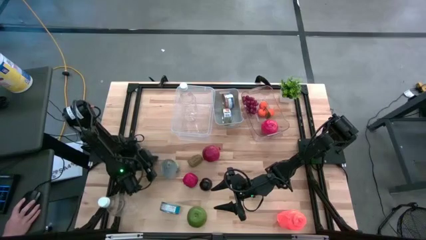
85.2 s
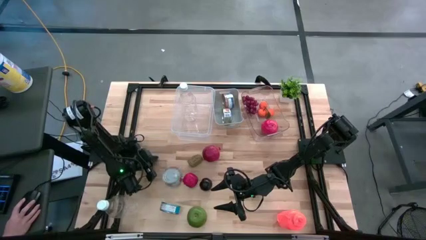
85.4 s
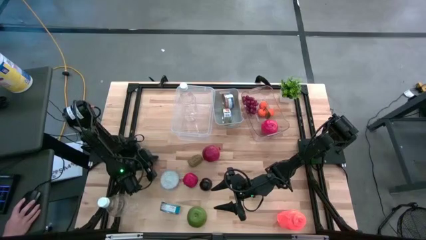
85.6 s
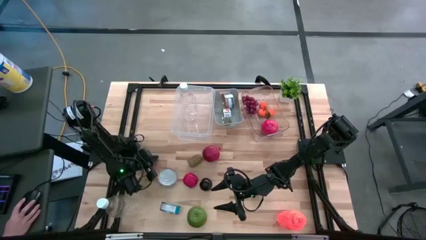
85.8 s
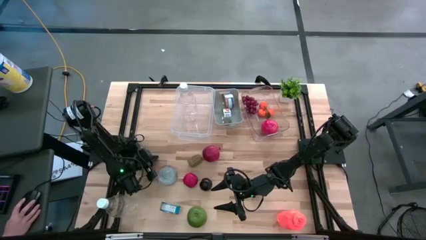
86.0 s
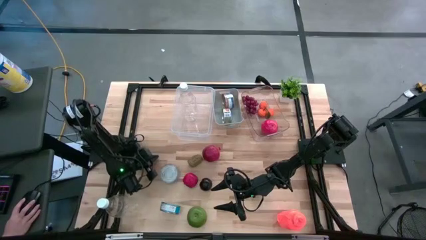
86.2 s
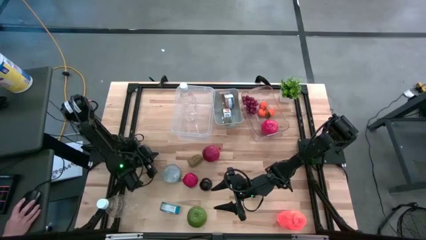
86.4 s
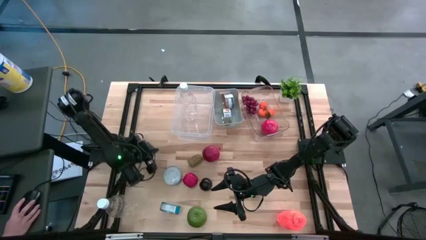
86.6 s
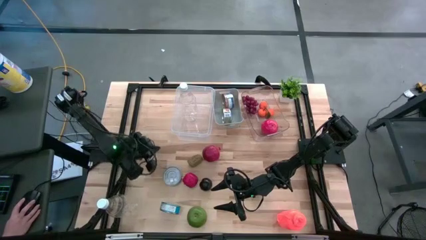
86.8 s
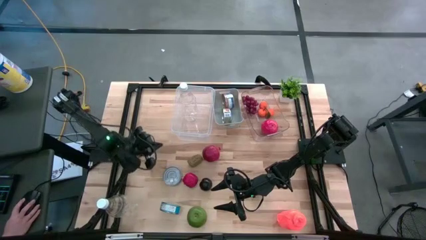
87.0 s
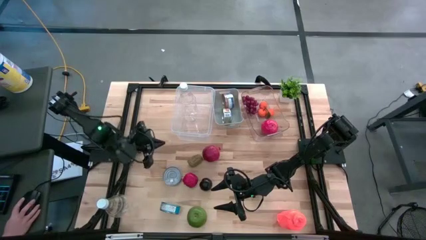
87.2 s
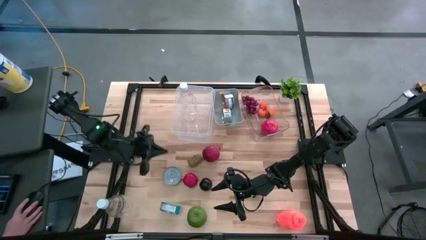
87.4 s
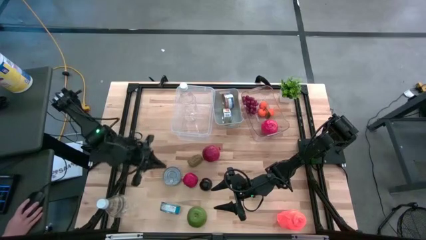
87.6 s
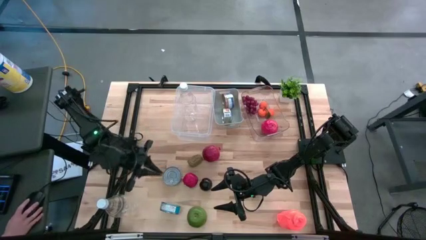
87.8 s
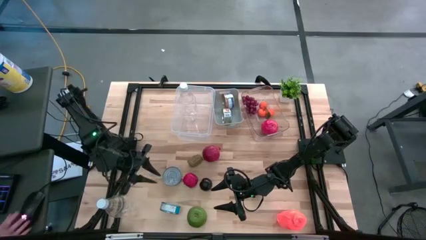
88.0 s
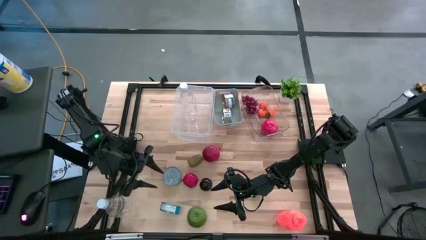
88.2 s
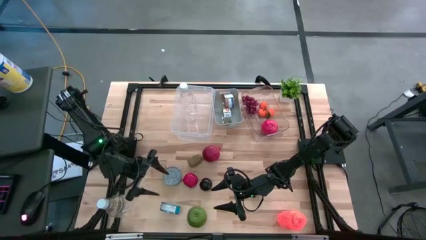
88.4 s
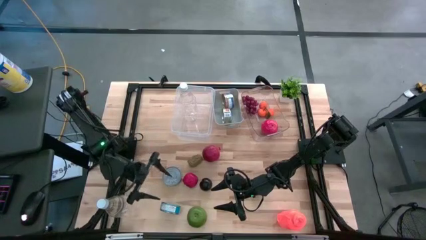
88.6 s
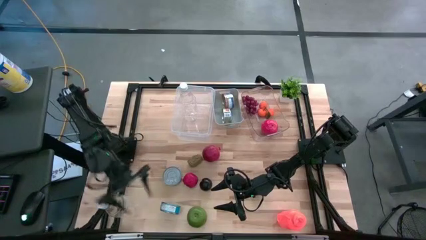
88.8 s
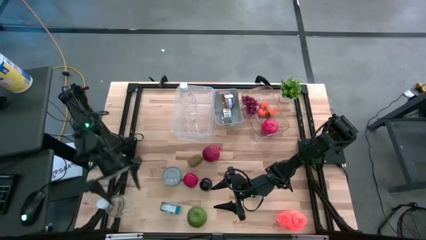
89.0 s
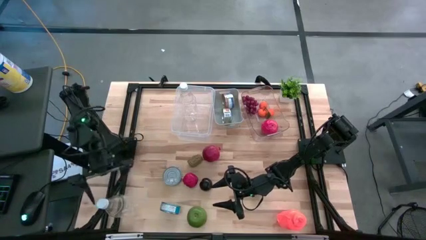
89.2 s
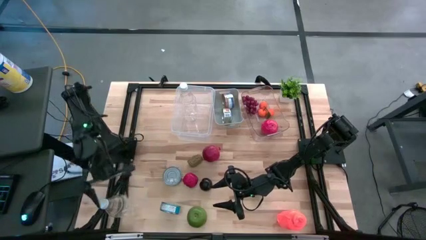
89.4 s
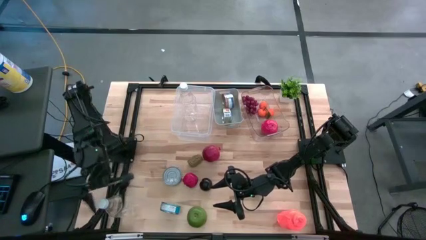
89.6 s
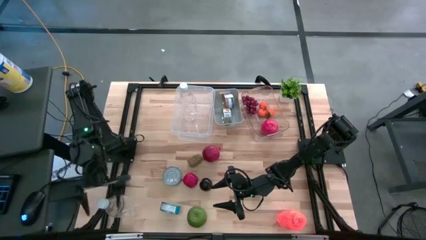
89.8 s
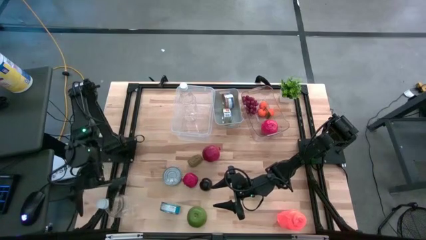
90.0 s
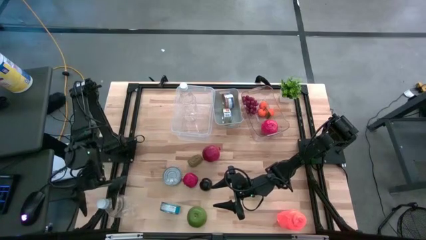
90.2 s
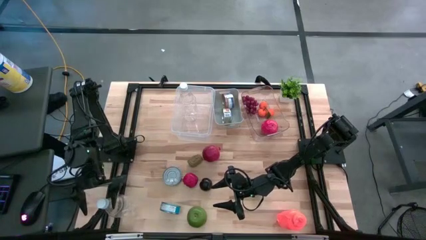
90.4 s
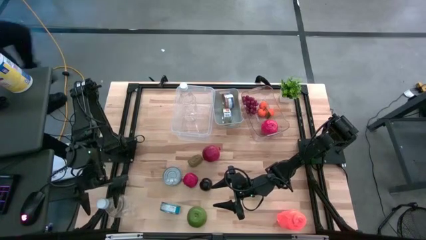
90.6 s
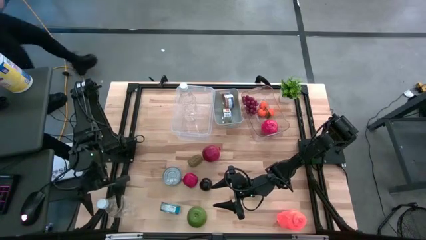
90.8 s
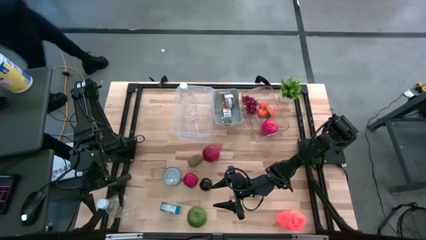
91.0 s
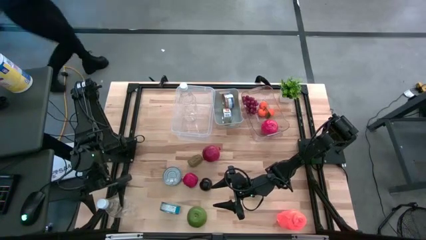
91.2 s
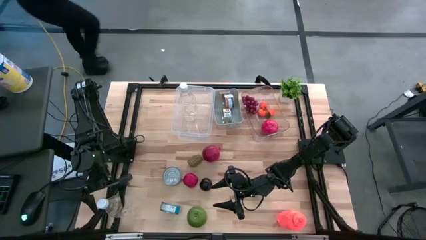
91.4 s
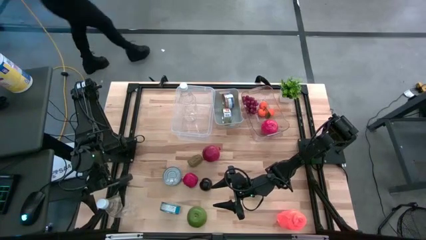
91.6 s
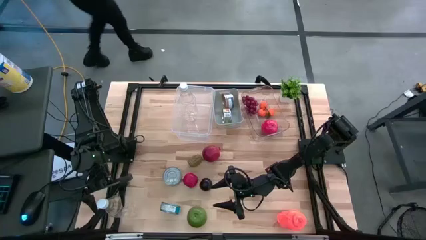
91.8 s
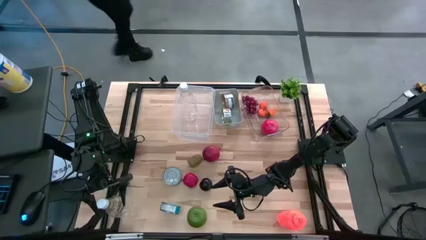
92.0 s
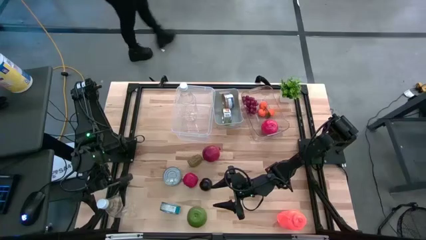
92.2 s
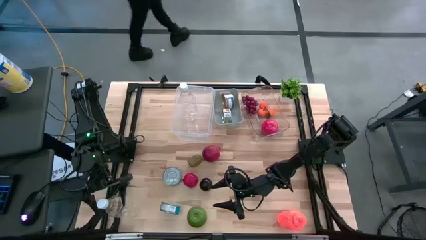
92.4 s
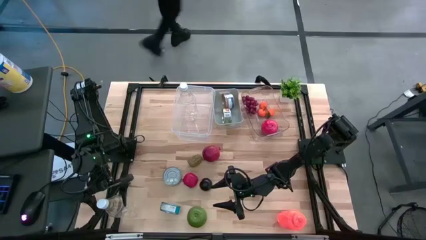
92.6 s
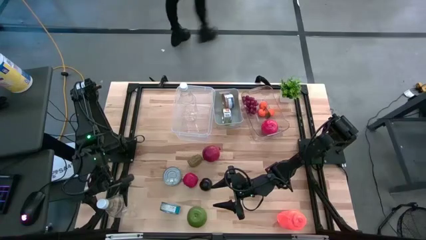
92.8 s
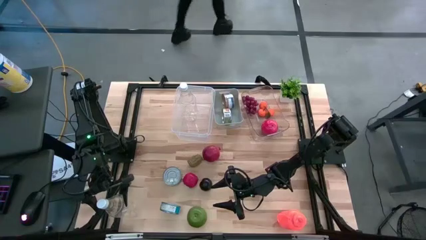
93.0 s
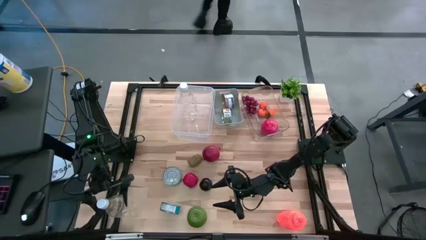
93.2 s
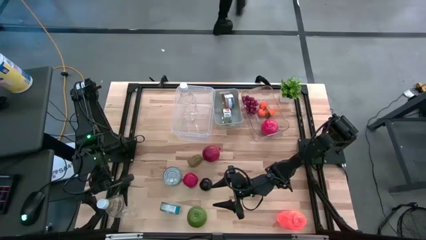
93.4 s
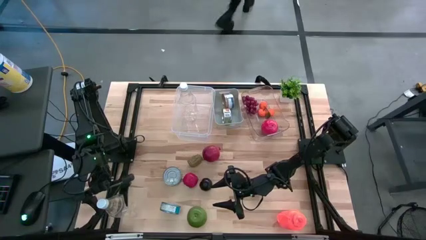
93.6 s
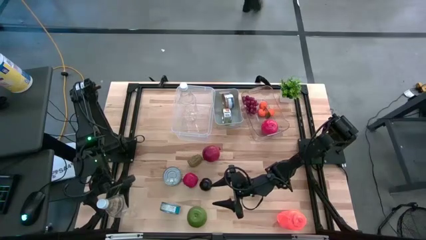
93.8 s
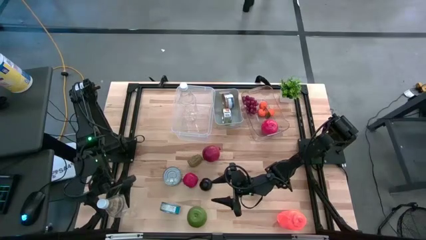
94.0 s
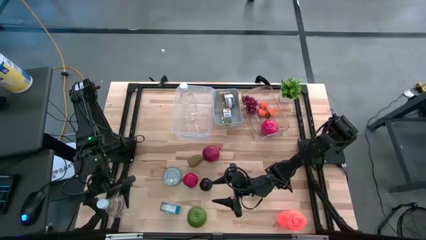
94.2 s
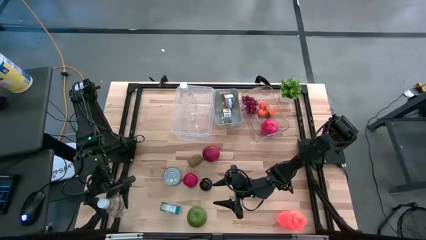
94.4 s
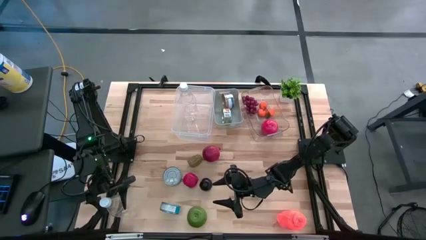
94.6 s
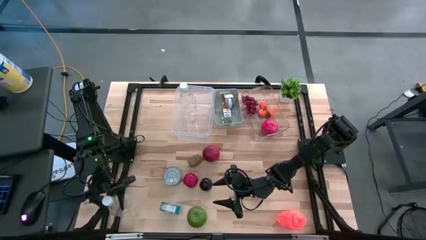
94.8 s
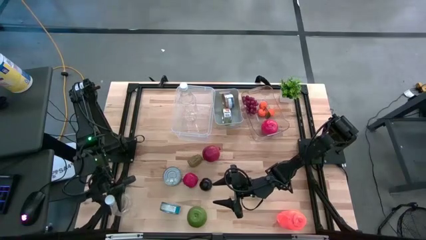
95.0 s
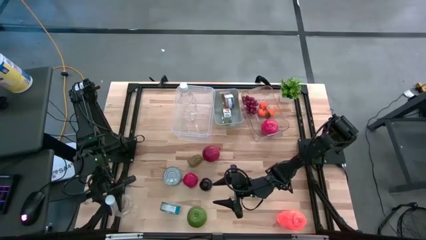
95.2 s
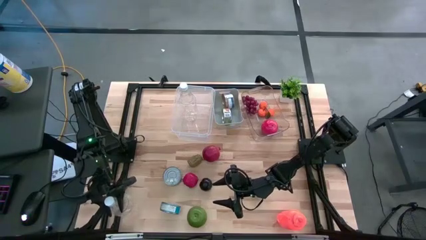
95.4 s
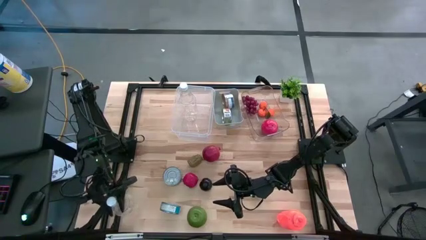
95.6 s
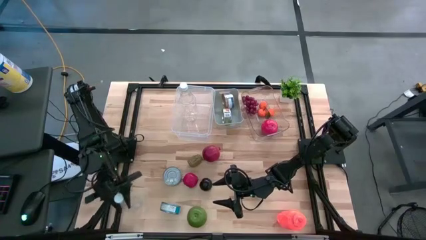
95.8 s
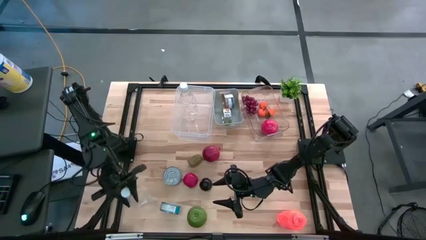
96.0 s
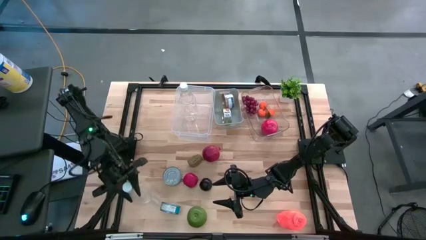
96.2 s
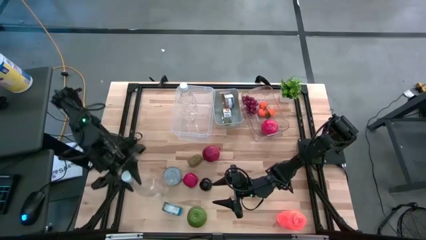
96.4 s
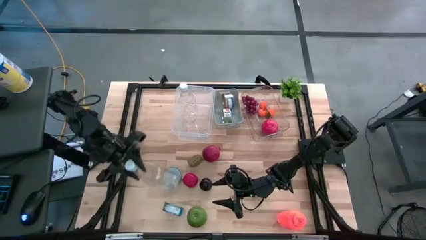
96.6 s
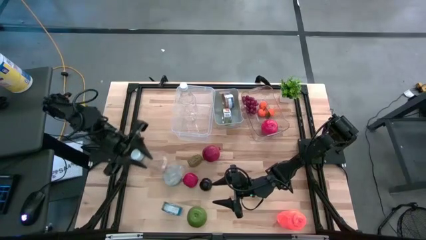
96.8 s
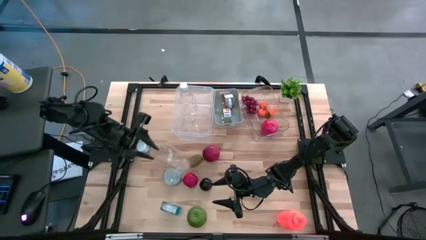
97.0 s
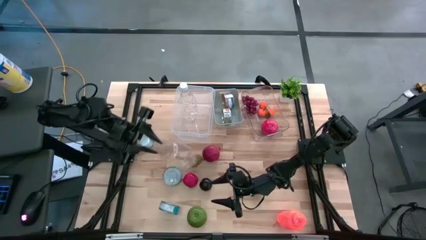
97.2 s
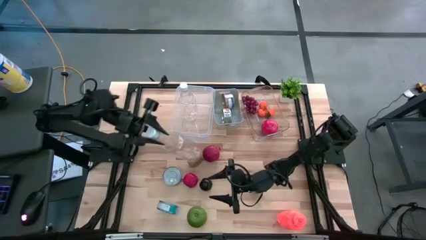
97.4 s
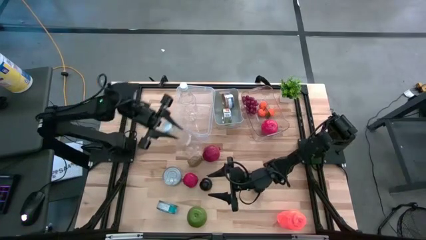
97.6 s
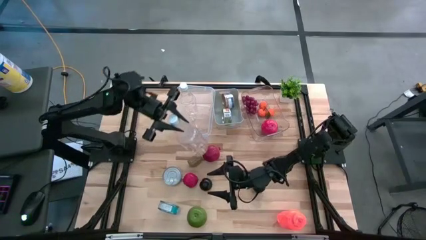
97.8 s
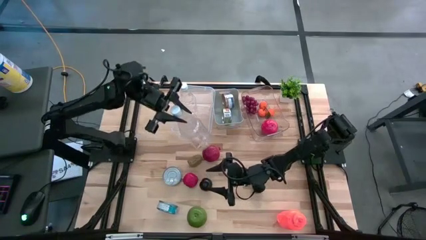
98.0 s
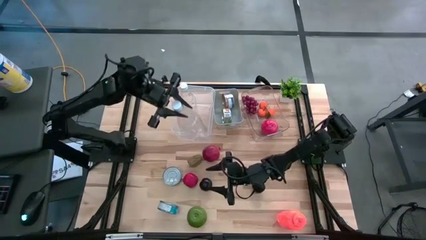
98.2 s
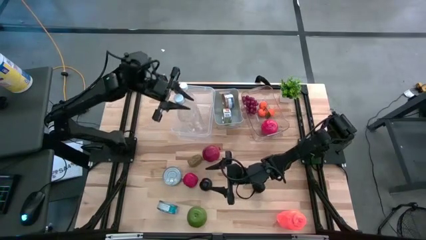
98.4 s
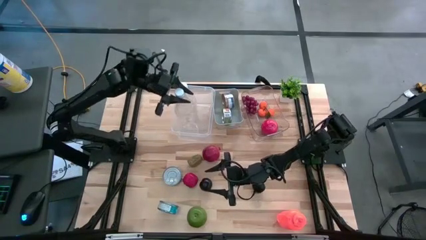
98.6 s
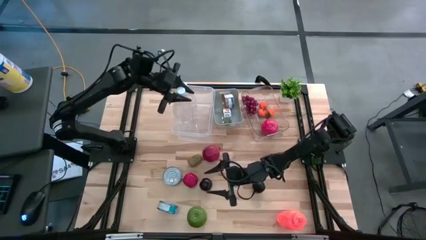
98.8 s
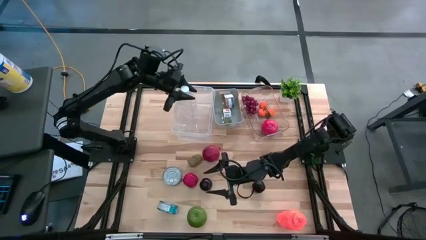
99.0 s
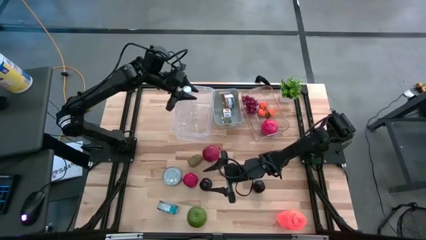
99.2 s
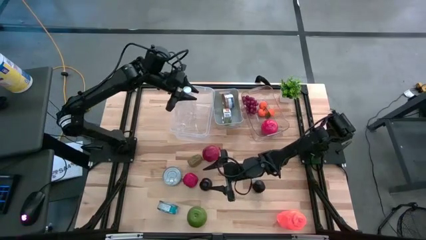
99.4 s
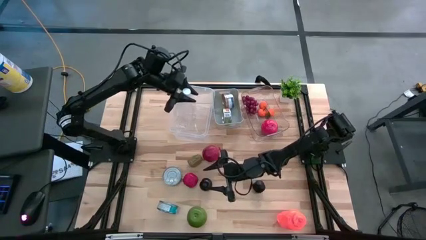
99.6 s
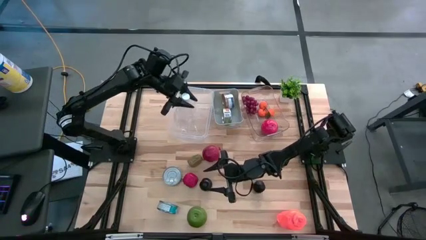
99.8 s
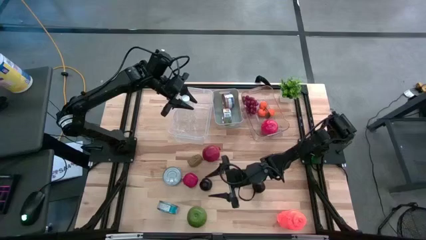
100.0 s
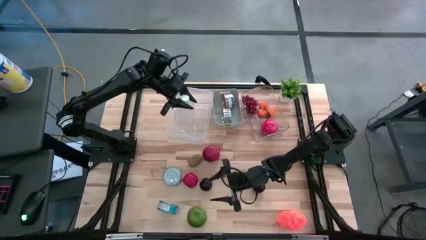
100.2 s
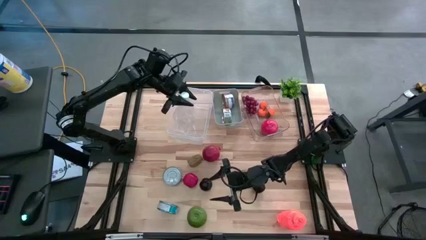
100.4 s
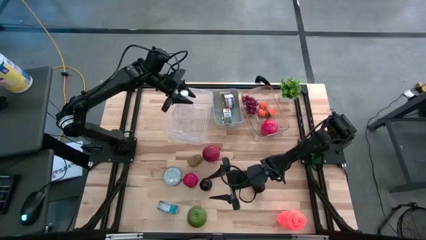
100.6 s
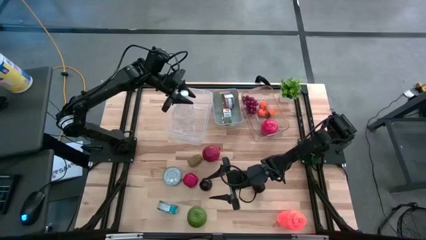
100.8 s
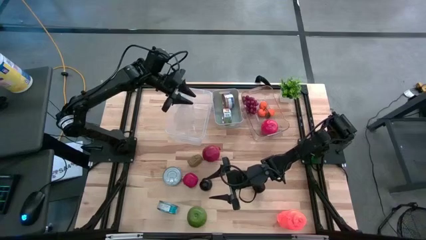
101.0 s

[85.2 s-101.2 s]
Task: Pick & Place Food Item
Put the transparent water bottle into the left transparent bin

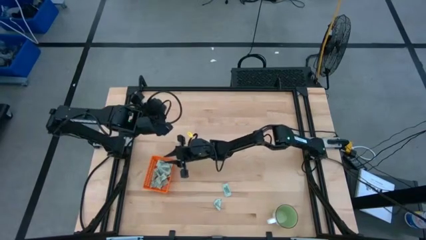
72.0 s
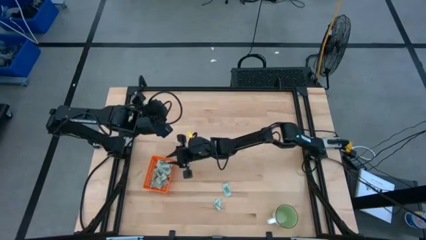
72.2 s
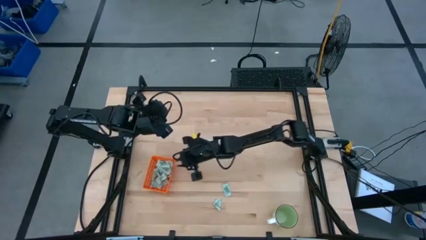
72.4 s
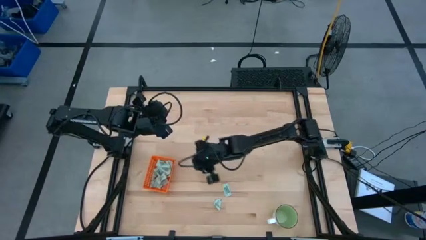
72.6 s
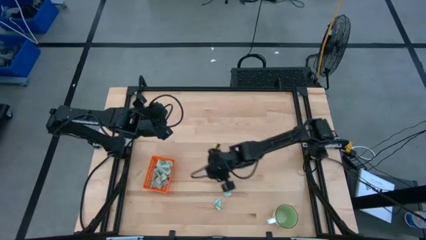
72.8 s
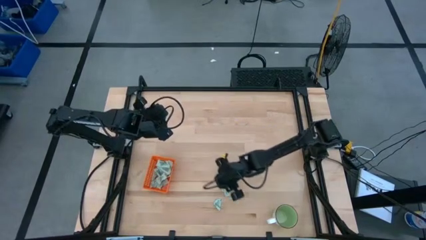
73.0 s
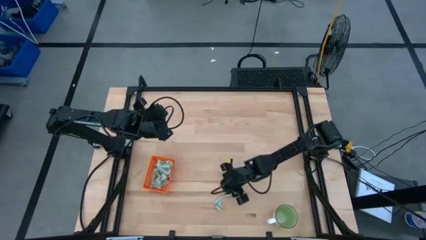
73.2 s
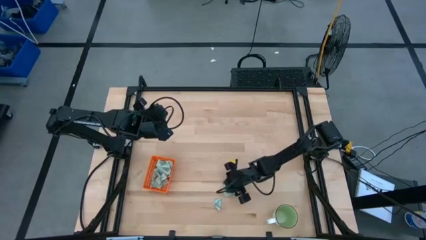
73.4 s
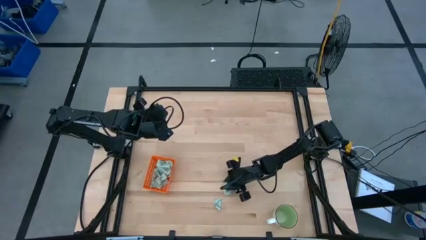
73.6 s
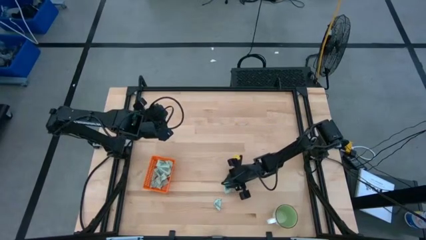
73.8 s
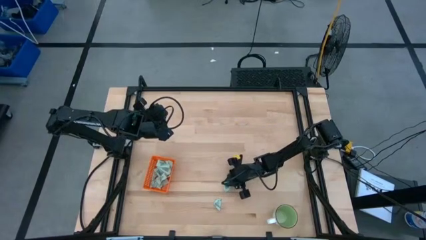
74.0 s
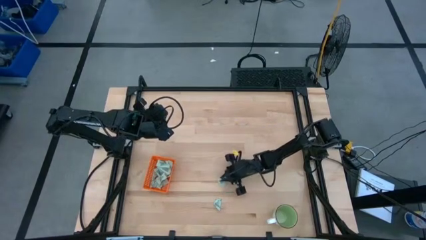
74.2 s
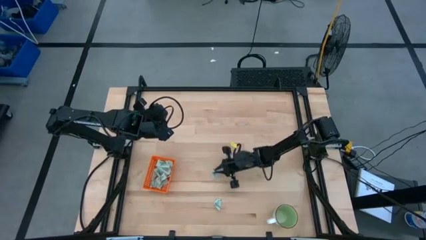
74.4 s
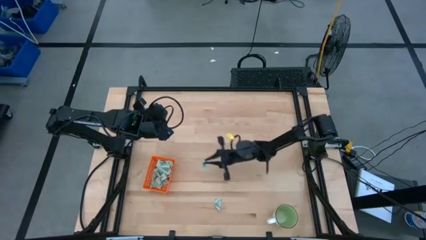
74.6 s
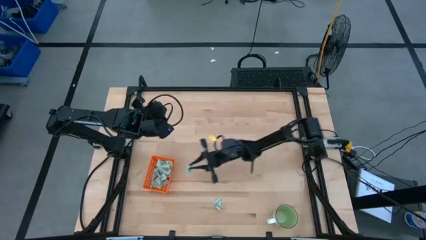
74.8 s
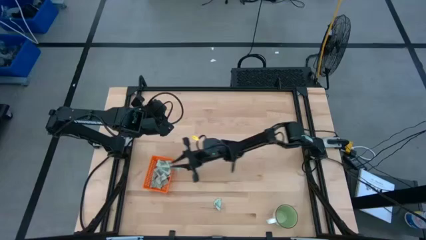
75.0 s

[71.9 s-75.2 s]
Task: Pick and place Stevia / Truvia into bins
Put the white stevia packet into the orange bin
